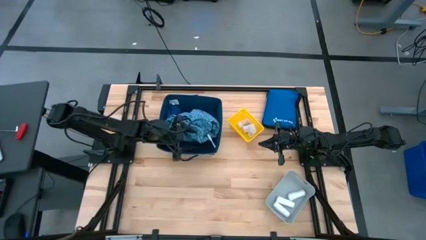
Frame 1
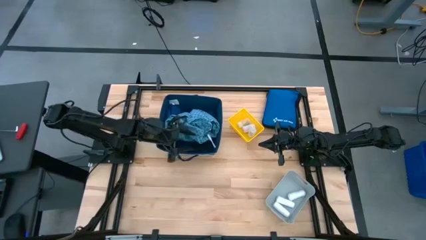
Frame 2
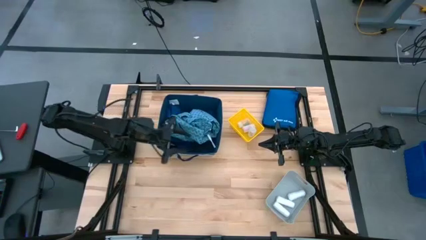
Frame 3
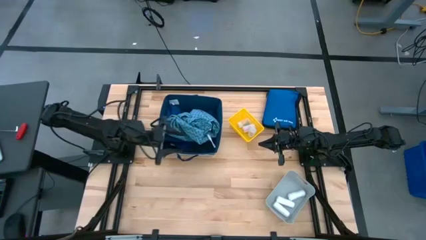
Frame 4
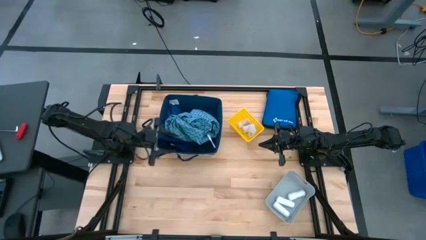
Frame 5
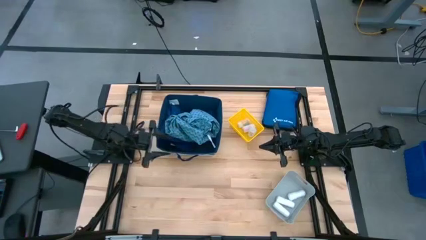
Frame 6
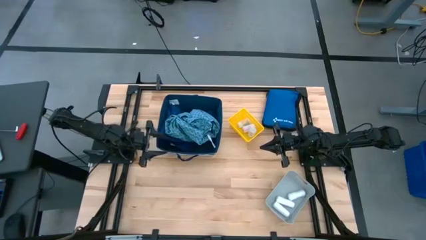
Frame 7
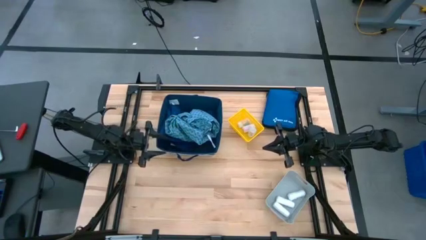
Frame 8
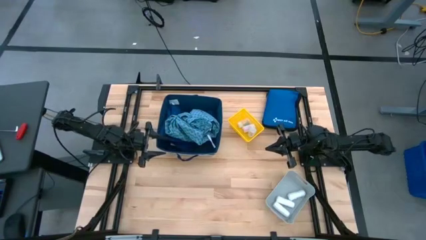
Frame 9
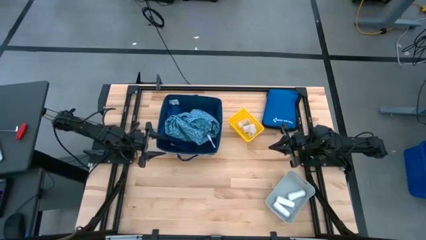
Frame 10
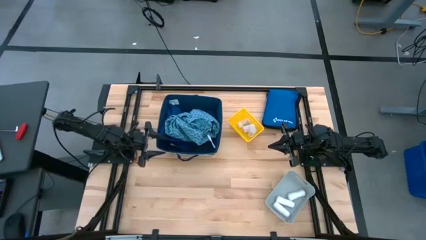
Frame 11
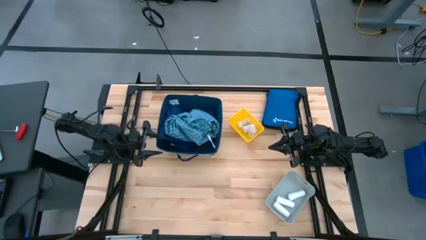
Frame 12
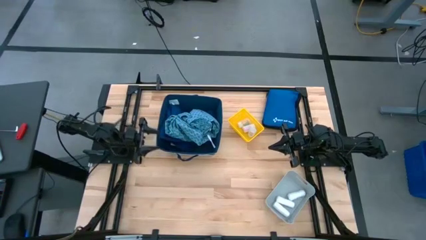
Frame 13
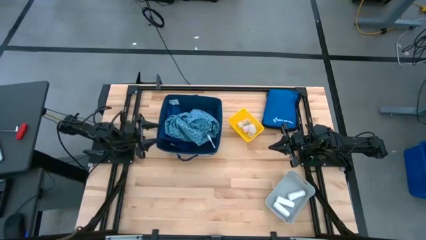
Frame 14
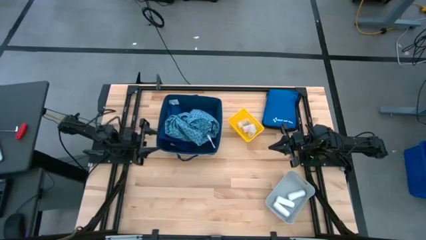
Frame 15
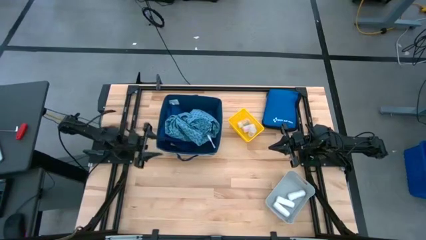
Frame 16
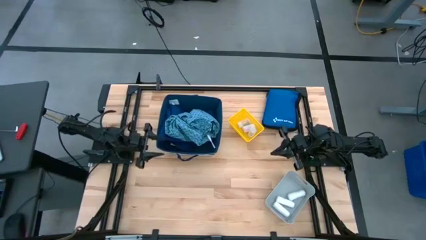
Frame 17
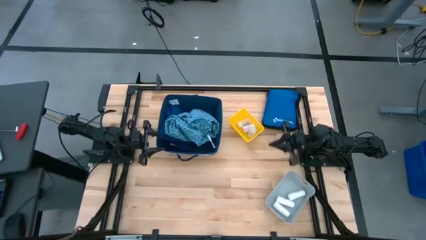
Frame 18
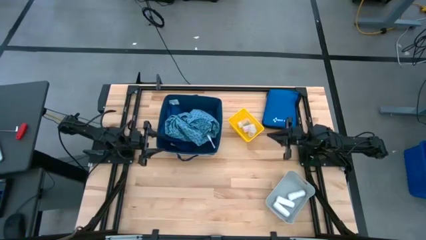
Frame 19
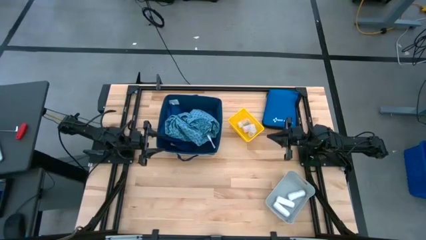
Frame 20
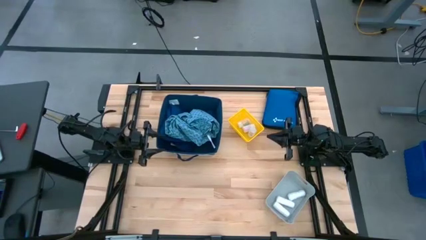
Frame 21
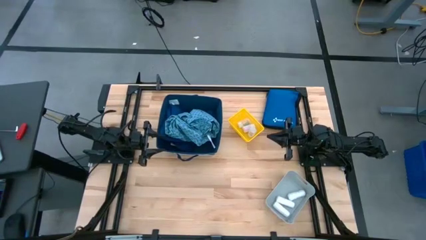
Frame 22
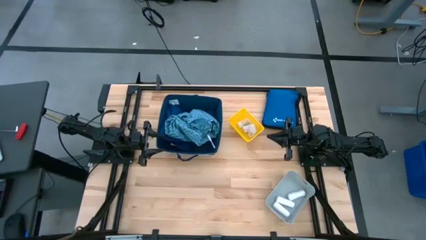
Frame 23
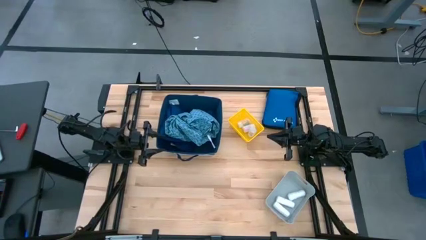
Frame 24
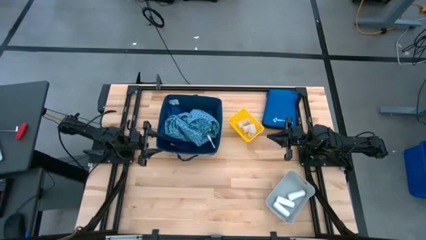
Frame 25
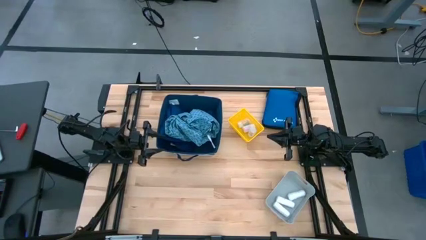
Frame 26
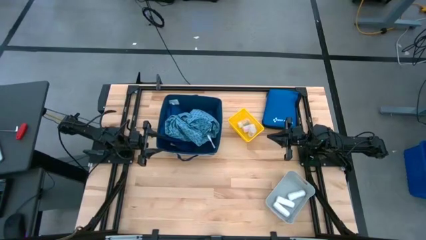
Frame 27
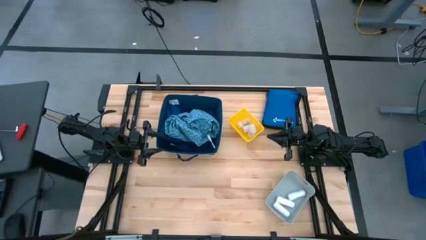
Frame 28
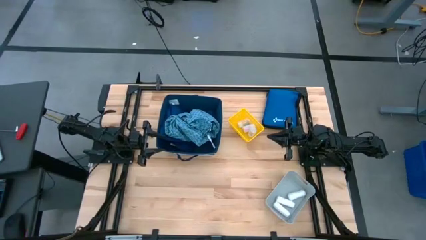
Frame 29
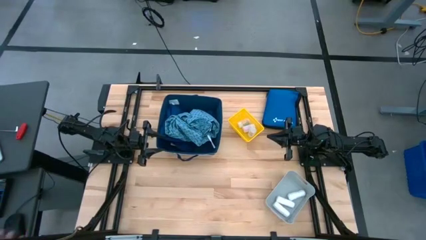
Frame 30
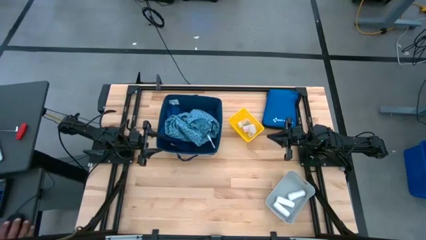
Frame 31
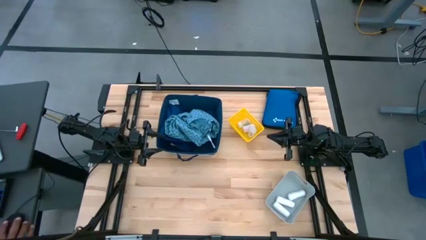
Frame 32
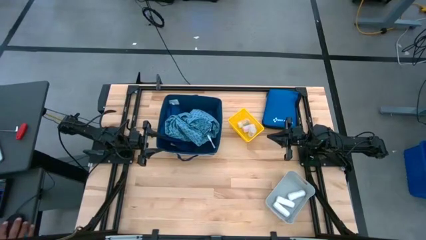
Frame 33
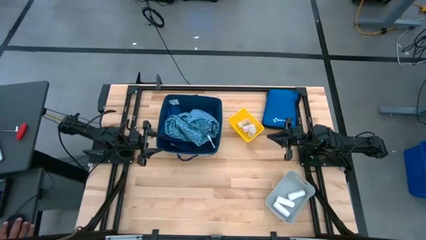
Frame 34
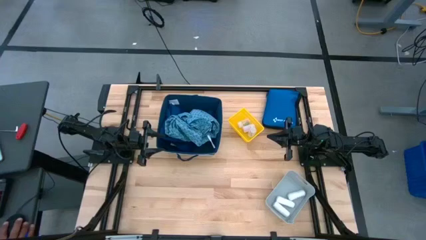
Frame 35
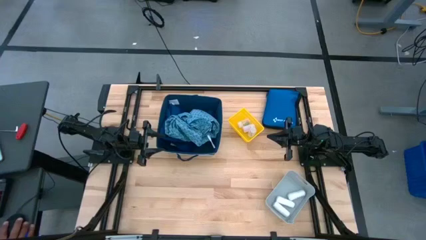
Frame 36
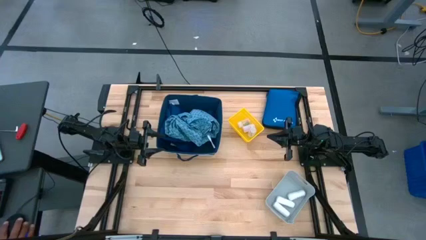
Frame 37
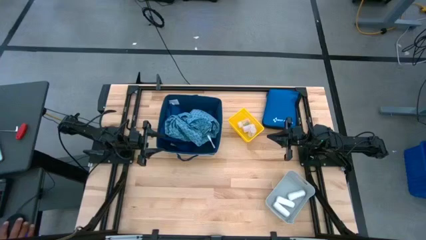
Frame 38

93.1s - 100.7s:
Task: Pick & place medical supplies in basket/bin
Return to Home Position

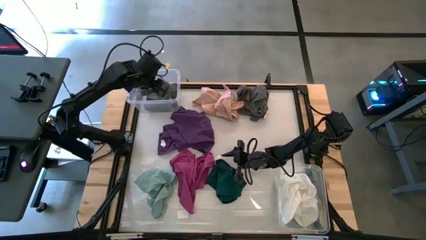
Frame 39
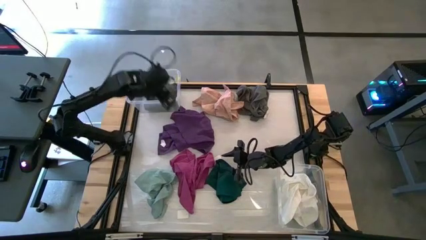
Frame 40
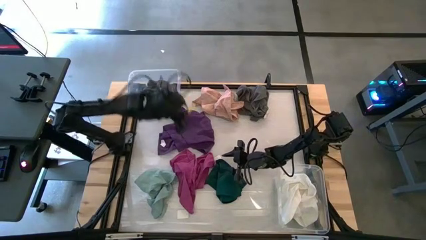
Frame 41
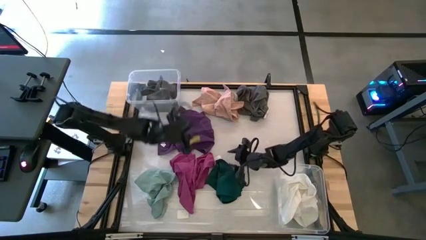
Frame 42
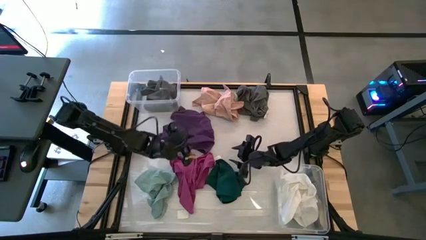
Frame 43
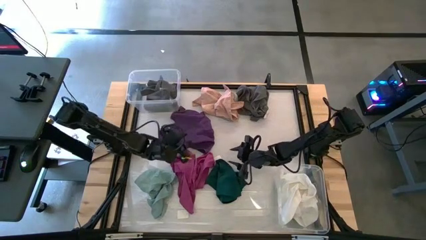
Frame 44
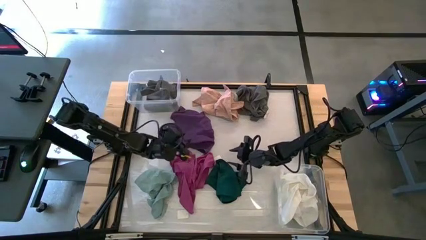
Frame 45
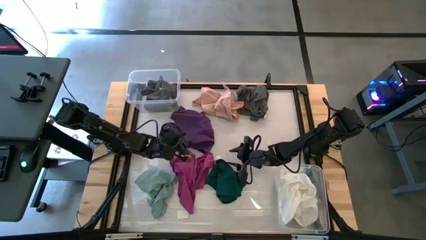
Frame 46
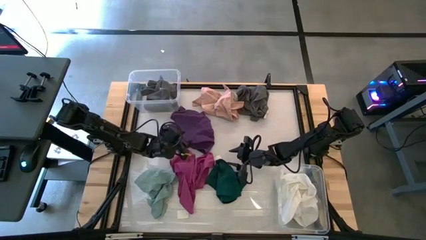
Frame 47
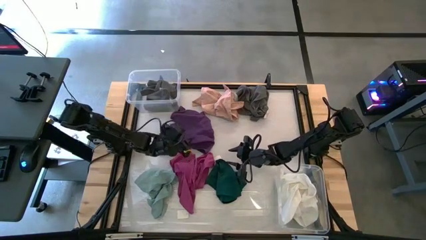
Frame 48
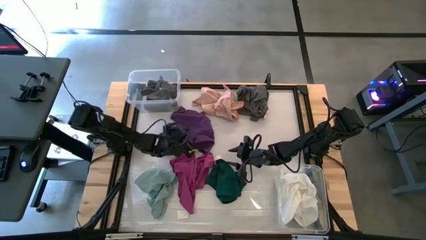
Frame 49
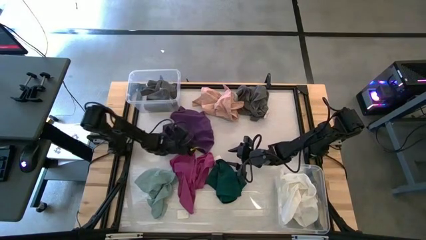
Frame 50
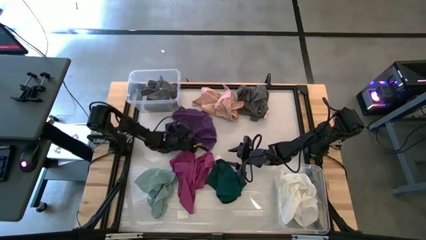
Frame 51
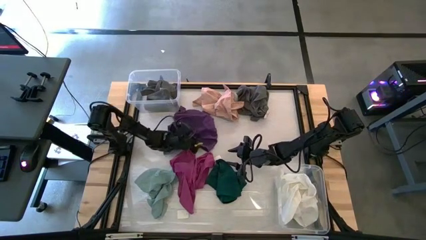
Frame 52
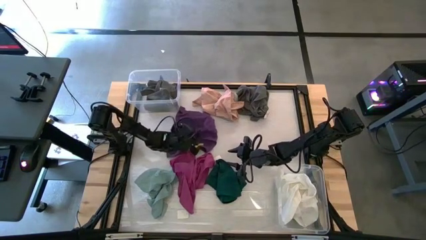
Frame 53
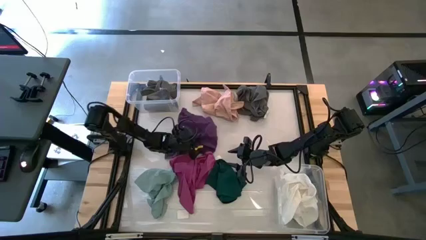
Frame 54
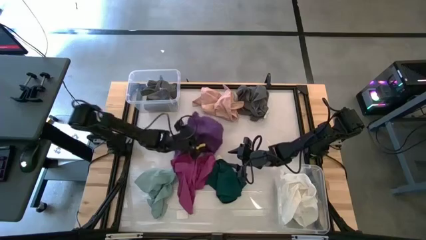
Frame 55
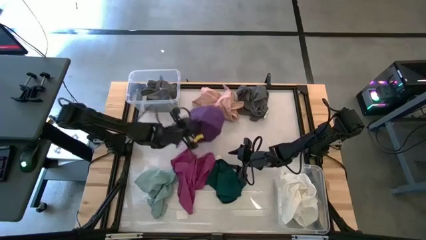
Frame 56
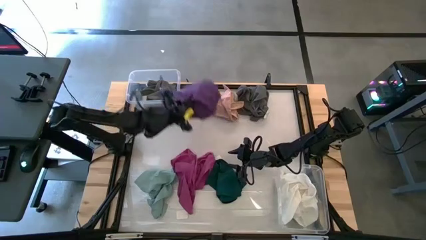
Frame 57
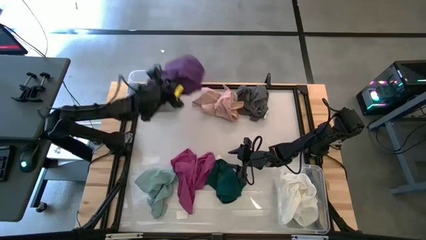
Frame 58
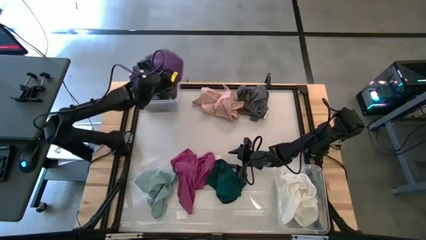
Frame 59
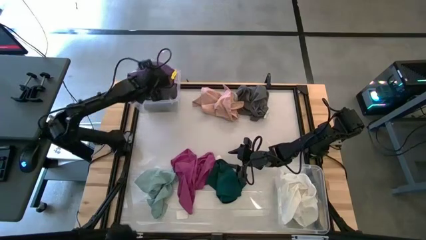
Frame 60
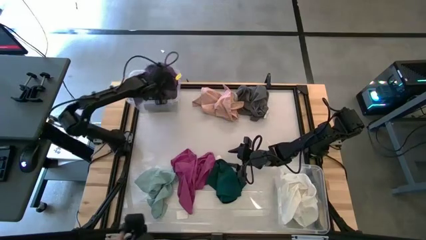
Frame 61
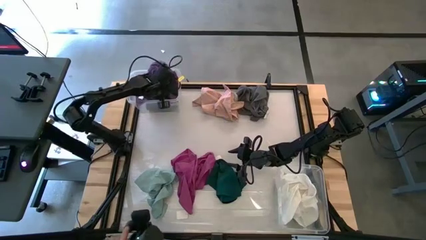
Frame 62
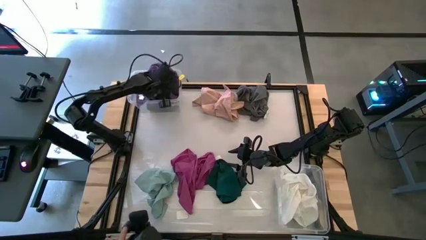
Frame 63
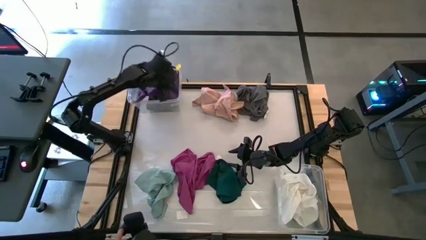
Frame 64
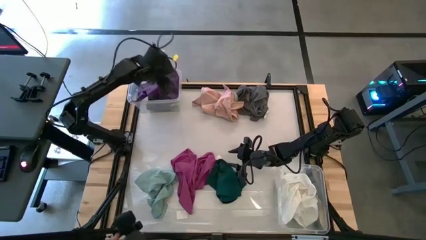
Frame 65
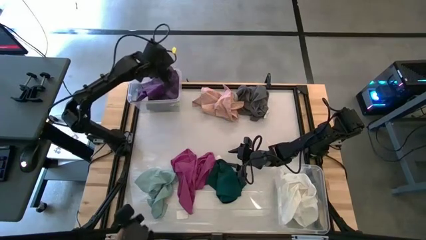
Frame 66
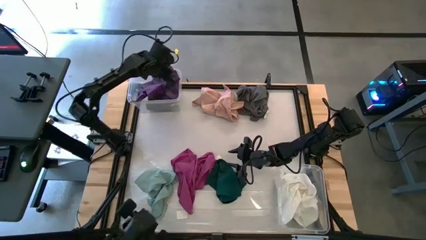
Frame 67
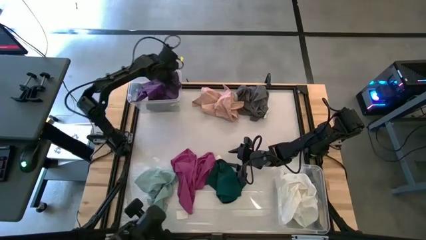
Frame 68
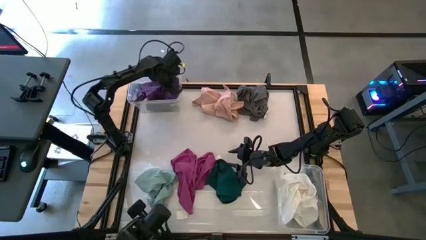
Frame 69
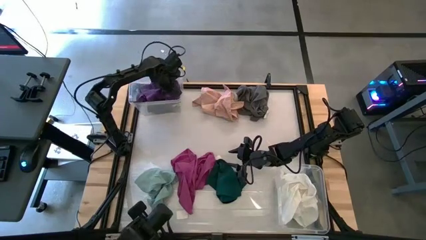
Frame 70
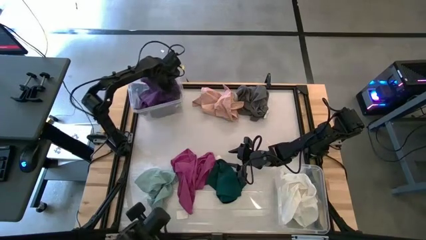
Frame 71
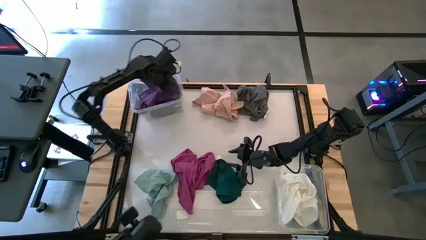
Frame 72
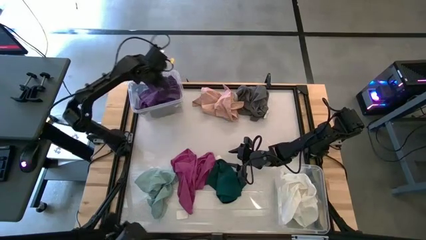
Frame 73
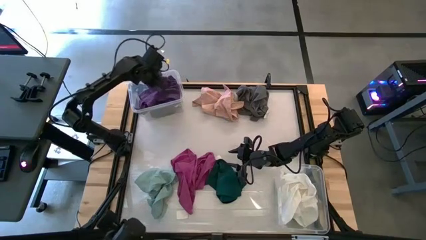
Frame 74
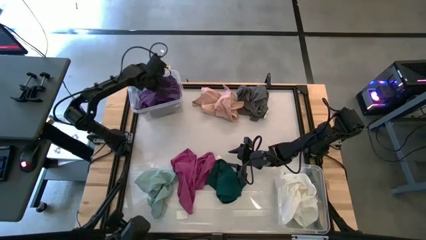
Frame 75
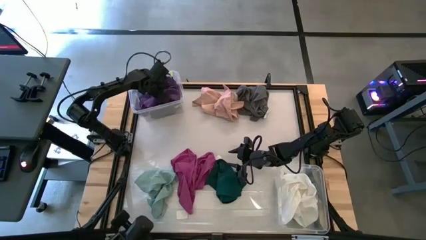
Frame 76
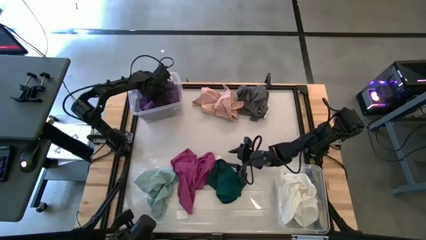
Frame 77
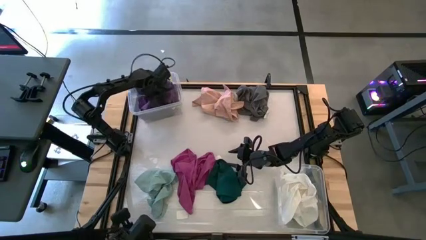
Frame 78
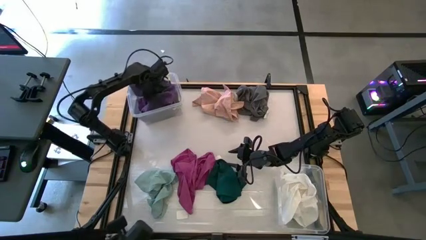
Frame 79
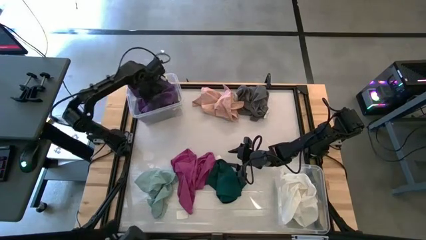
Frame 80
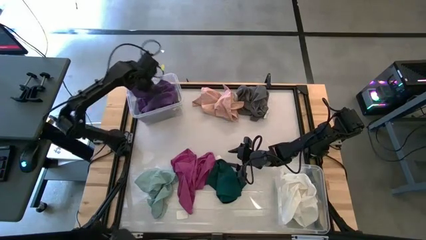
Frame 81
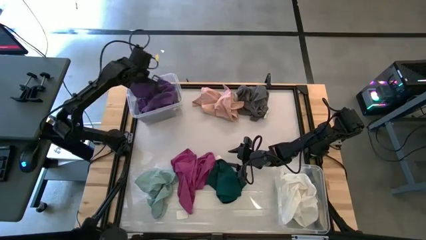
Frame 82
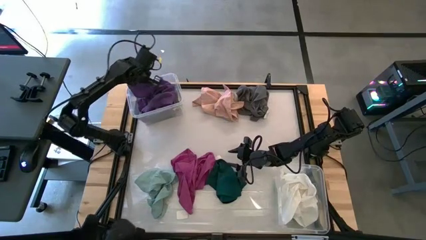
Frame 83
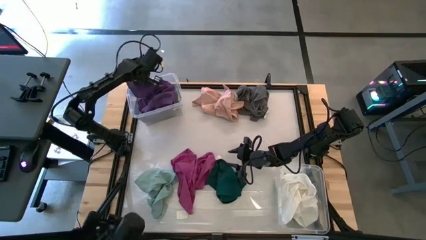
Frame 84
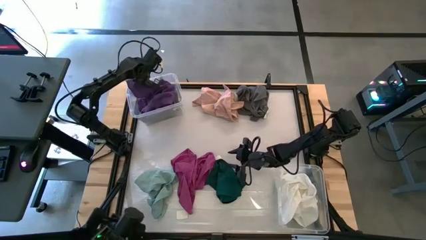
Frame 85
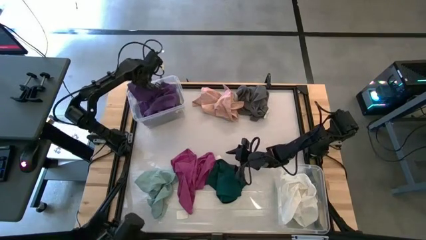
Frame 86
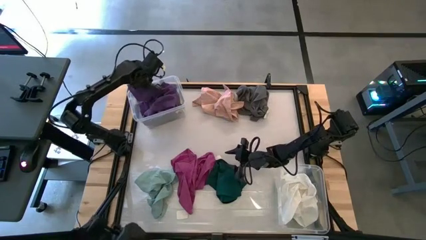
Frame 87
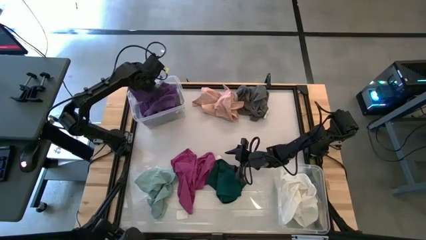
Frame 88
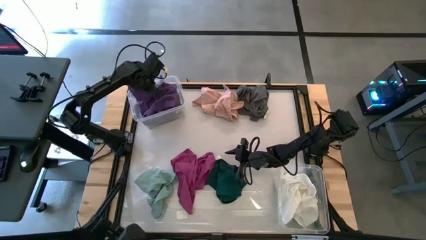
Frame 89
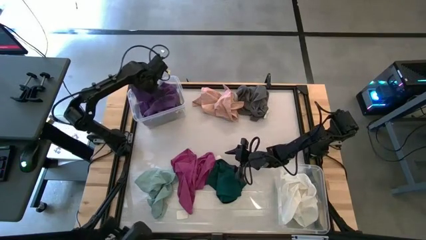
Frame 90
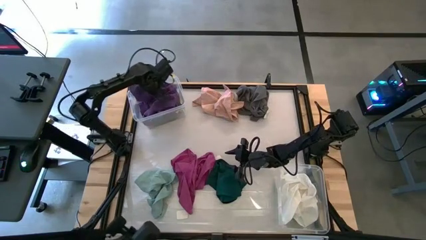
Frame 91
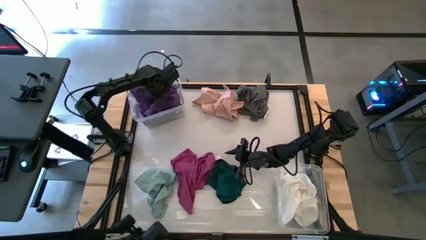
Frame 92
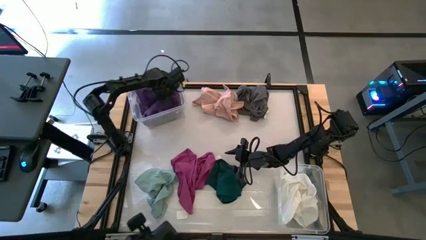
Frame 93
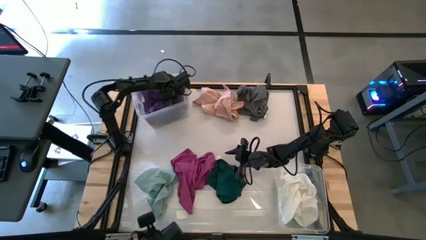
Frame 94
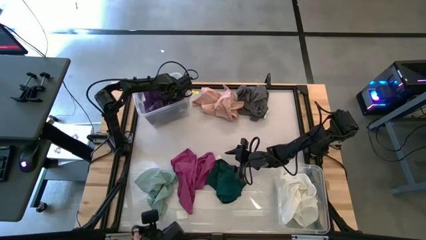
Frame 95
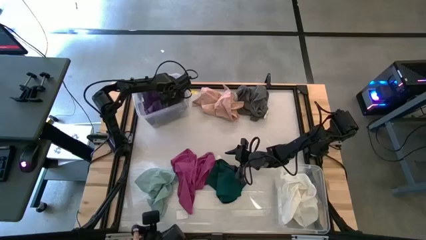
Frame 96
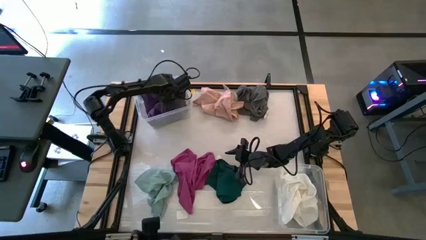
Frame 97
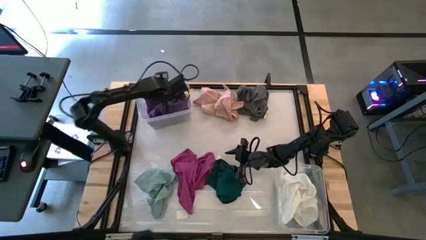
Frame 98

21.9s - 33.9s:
Task: Sort microfiber towel by color & place in baskets
Put the purple towel into the top transparent bin
